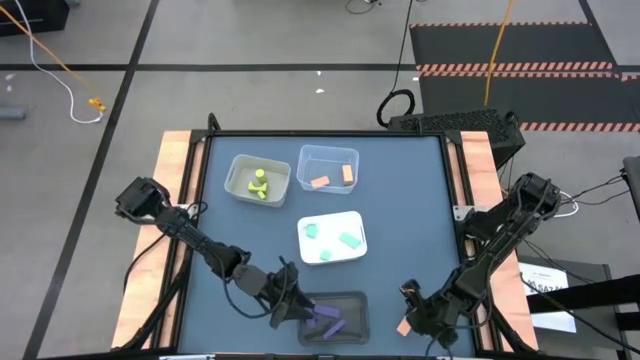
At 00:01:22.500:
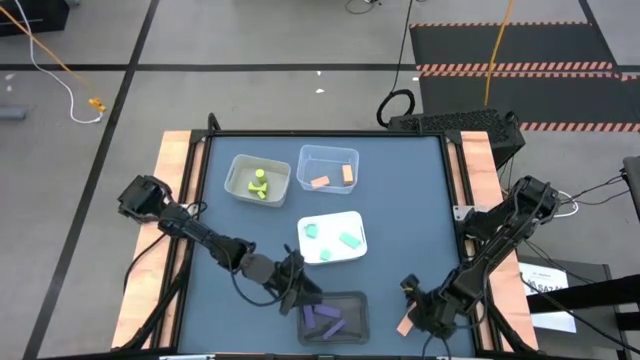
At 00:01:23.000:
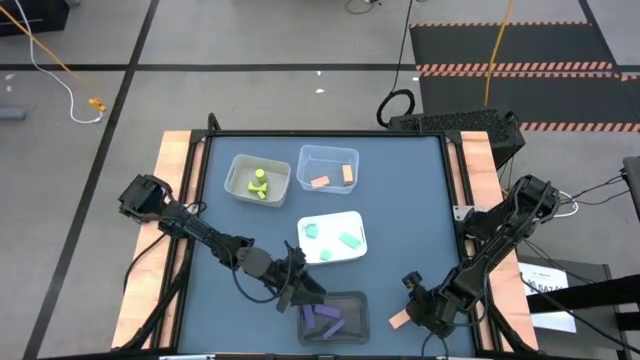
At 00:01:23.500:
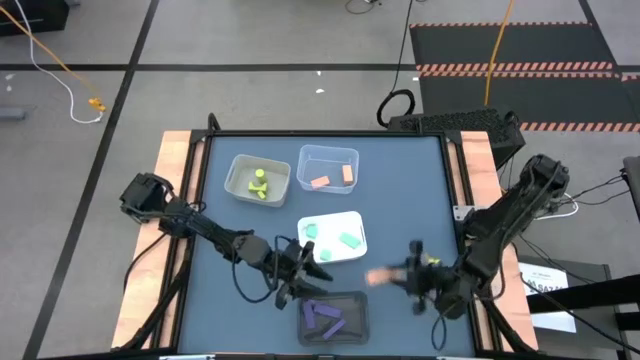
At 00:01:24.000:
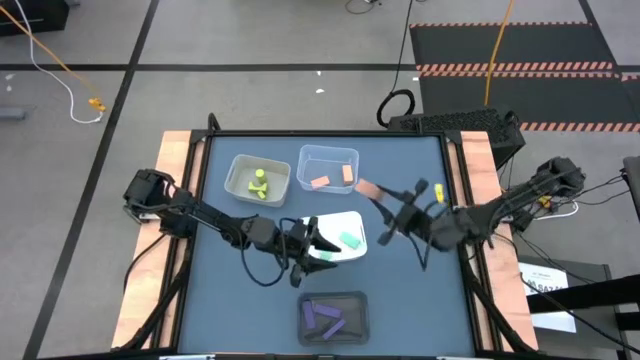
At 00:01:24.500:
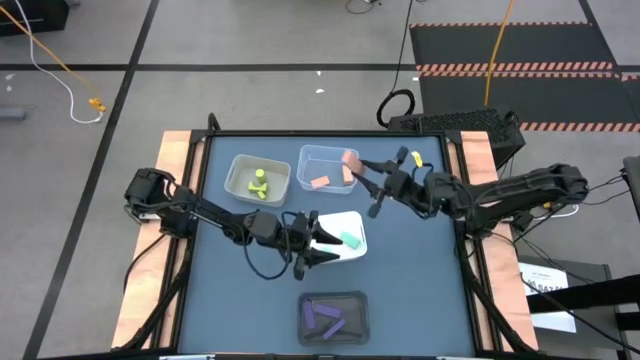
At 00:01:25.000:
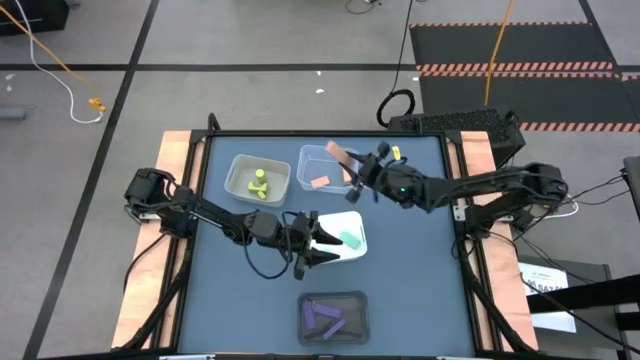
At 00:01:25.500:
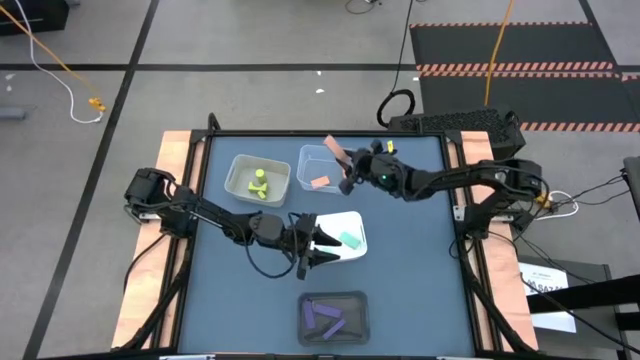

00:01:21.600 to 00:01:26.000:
Task: Sort & place blocks by color
Put the brown block into the transparent bin

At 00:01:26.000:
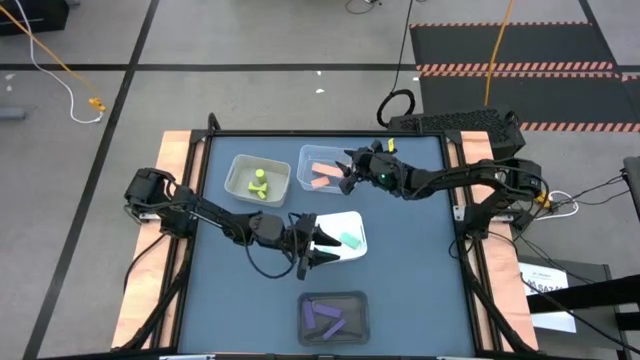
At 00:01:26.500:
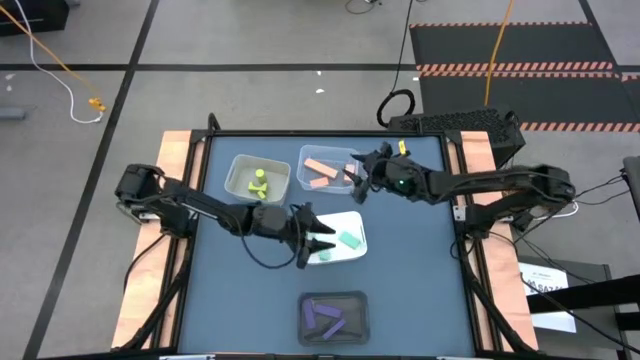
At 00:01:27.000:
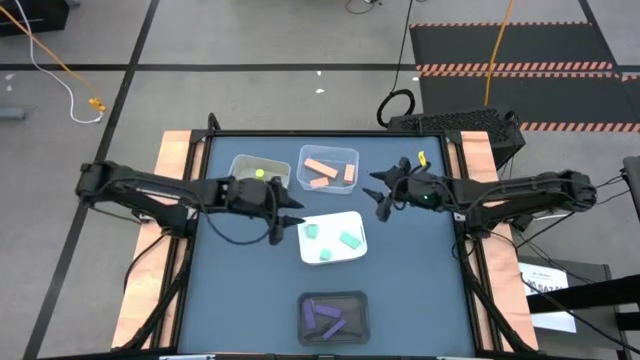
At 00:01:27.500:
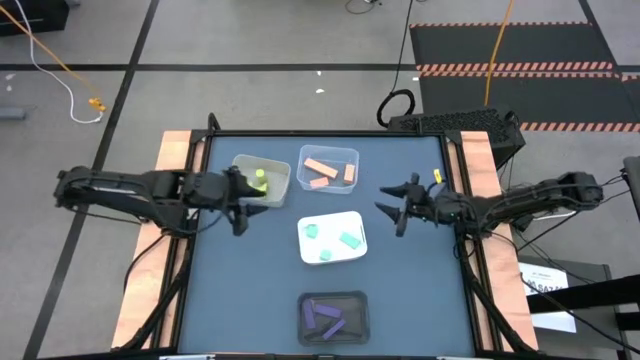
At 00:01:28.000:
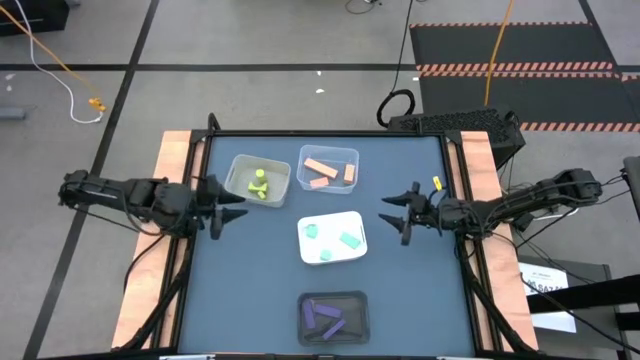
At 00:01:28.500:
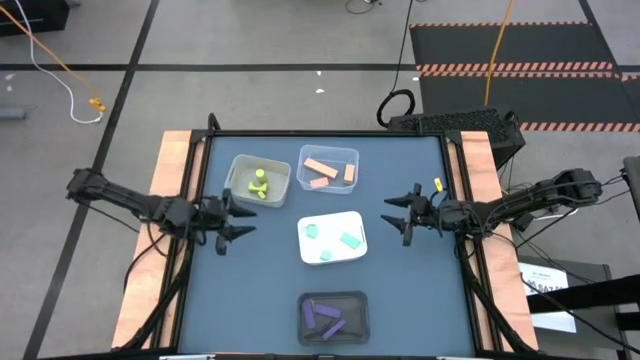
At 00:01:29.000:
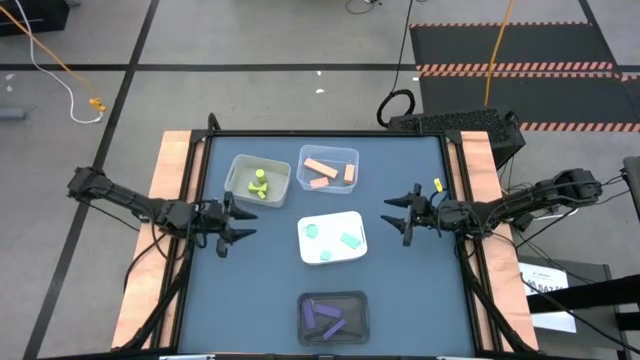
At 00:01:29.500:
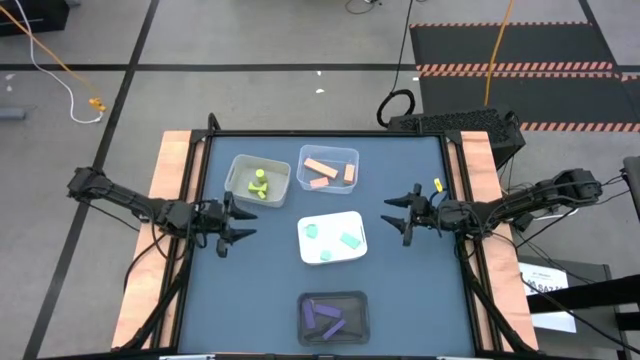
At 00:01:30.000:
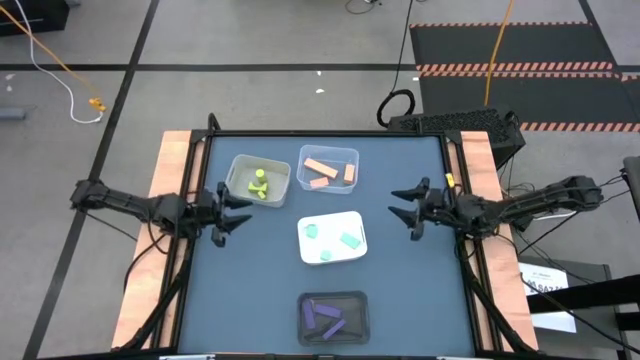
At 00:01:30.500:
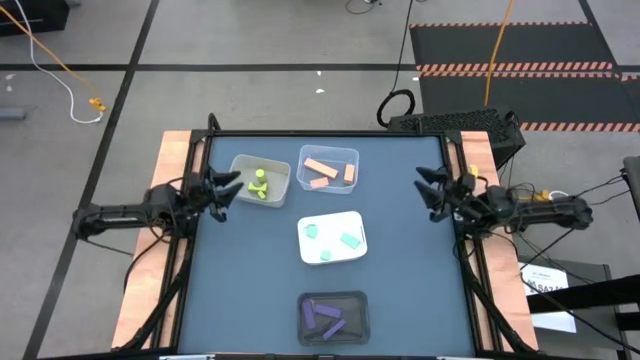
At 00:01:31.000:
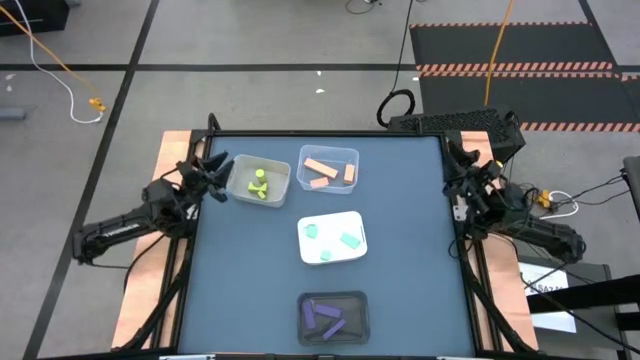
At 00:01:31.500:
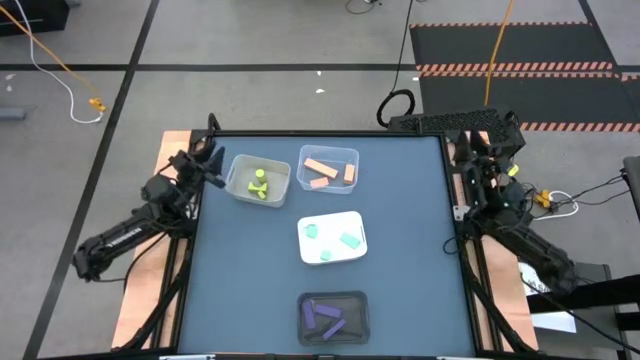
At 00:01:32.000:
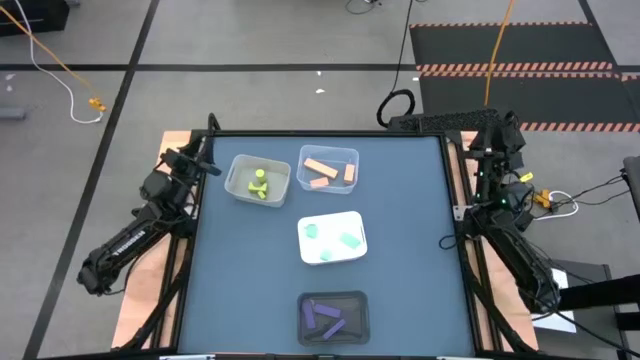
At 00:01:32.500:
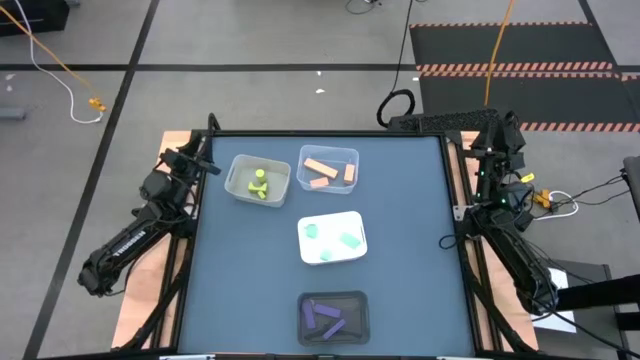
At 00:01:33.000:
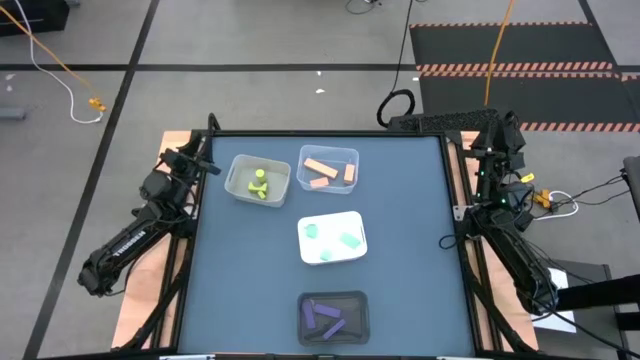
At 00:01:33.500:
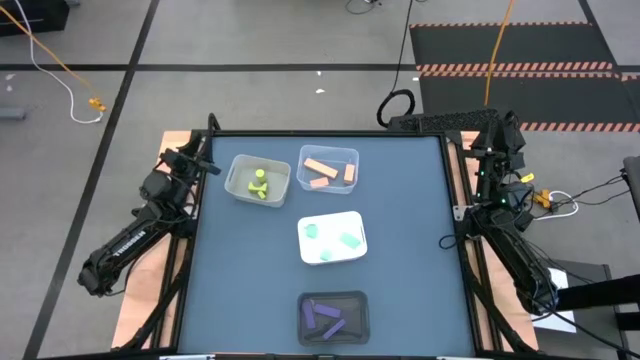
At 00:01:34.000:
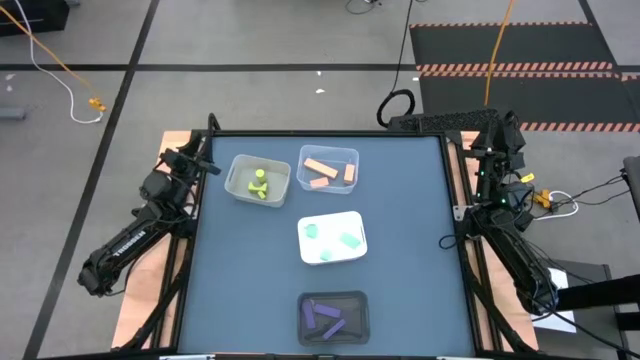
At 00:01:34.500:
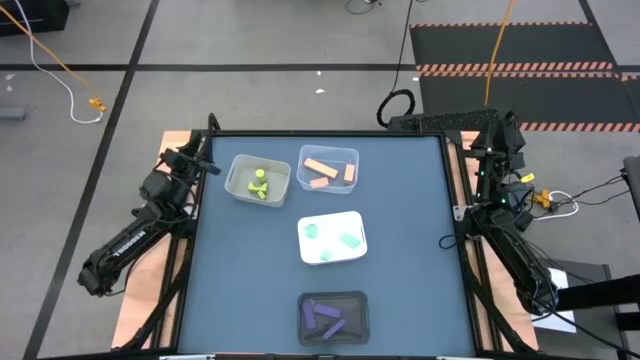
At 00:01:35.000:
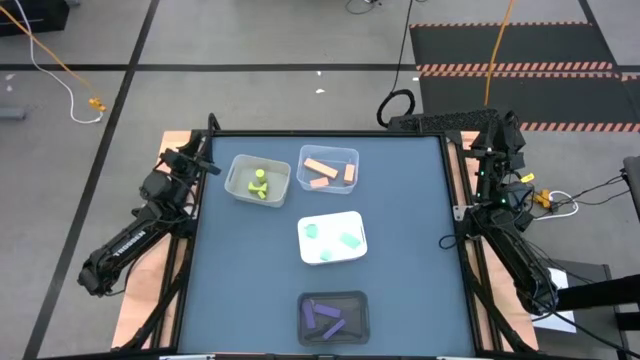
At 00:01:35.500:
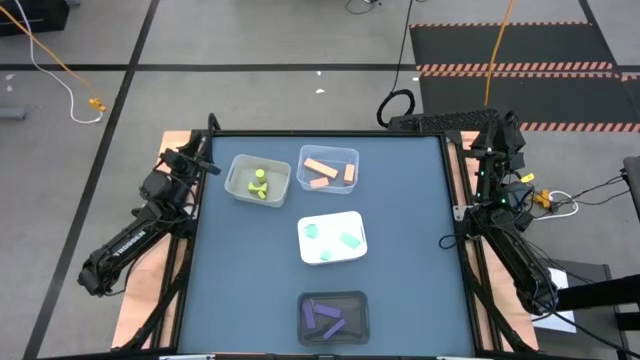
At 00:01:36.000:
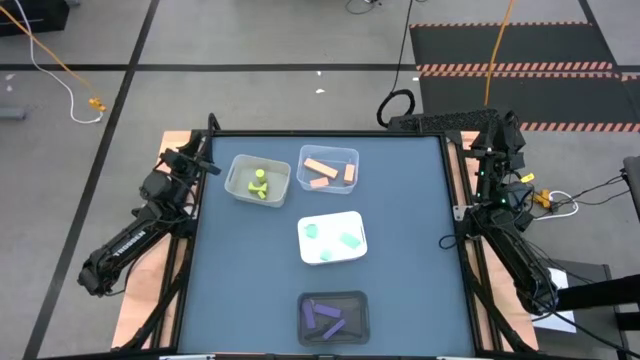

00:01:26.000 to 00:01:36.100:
Return to Home Position

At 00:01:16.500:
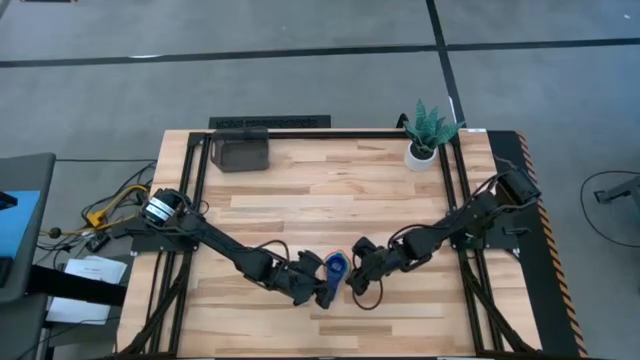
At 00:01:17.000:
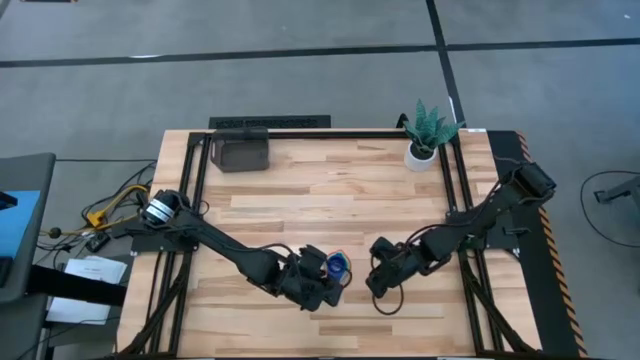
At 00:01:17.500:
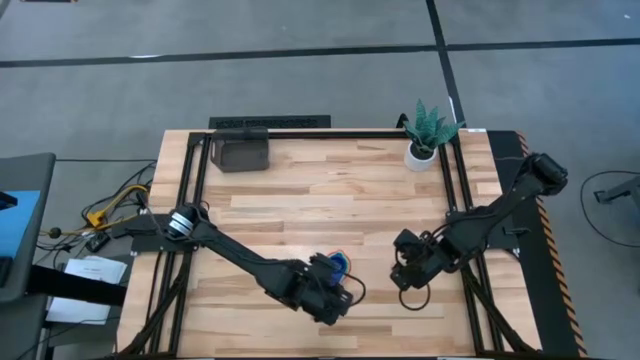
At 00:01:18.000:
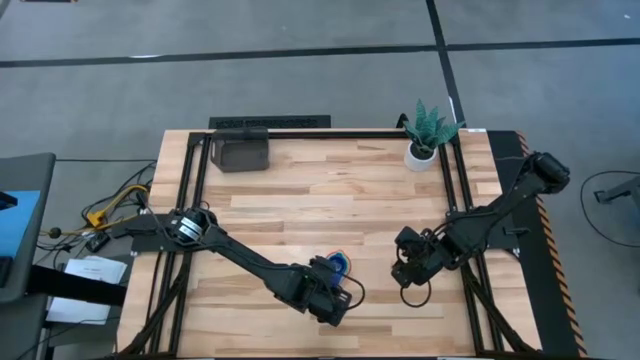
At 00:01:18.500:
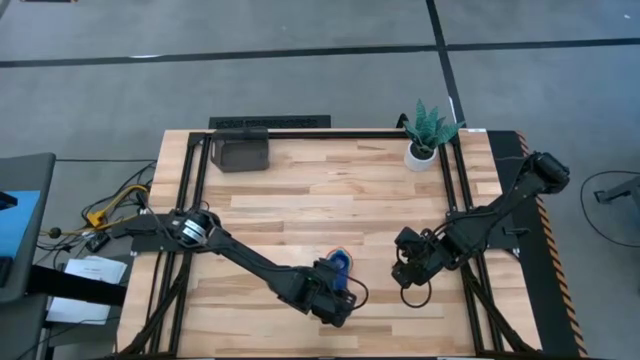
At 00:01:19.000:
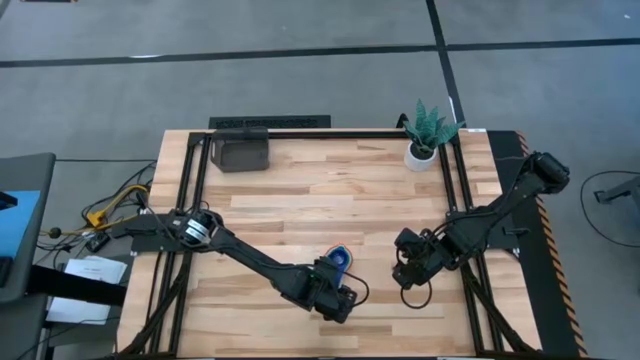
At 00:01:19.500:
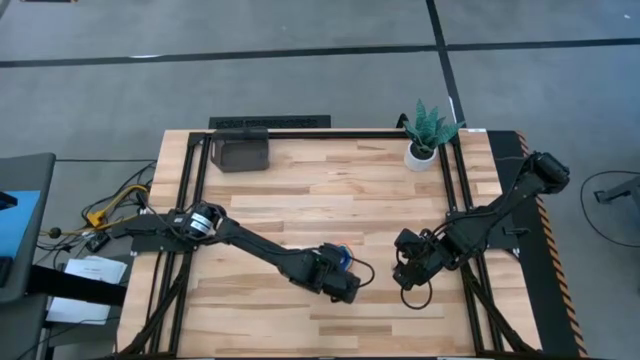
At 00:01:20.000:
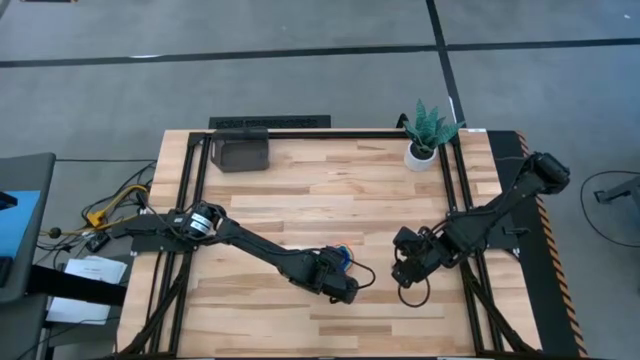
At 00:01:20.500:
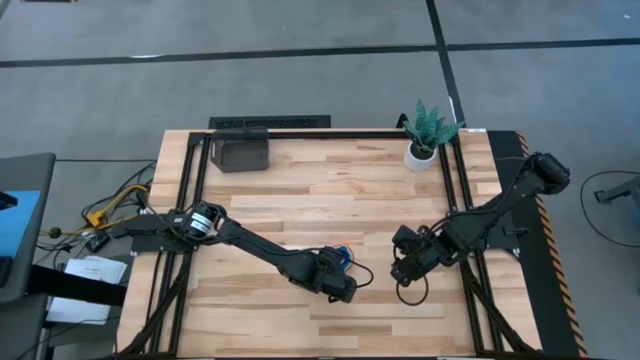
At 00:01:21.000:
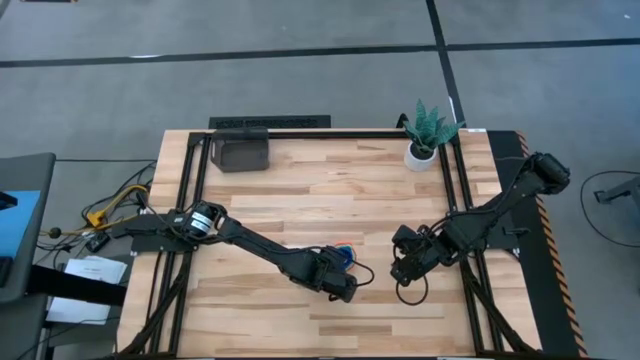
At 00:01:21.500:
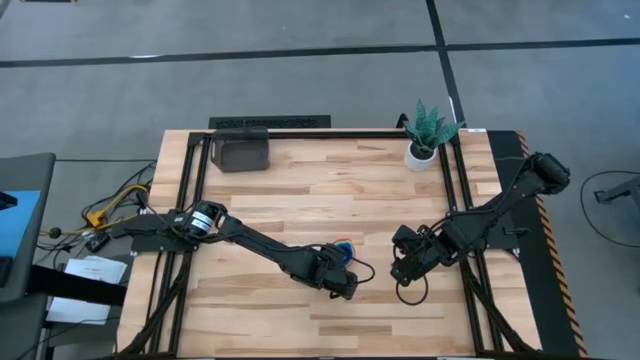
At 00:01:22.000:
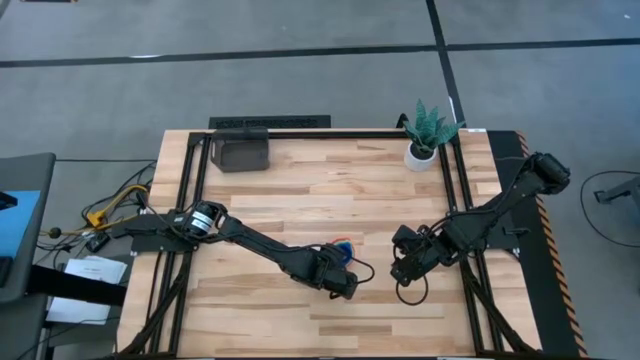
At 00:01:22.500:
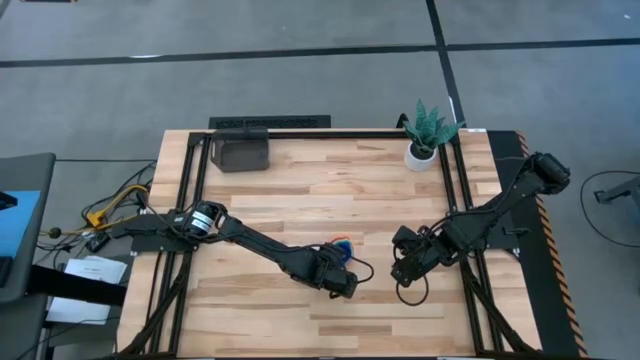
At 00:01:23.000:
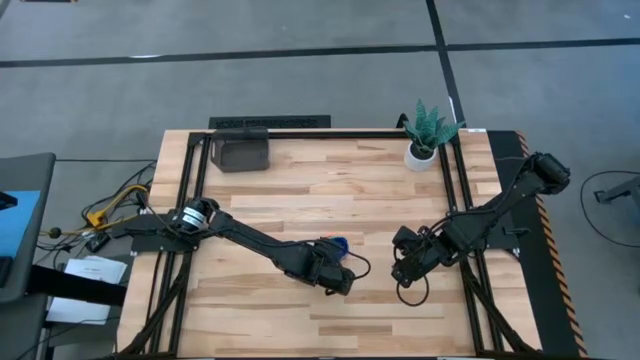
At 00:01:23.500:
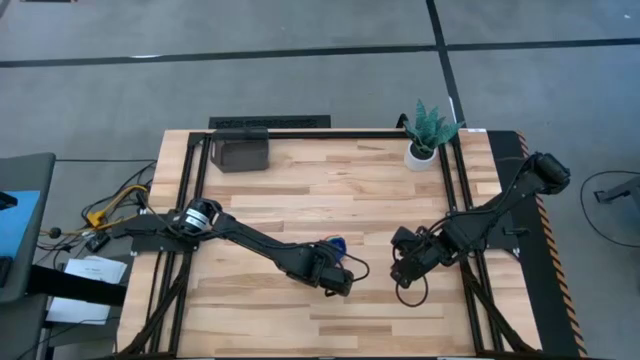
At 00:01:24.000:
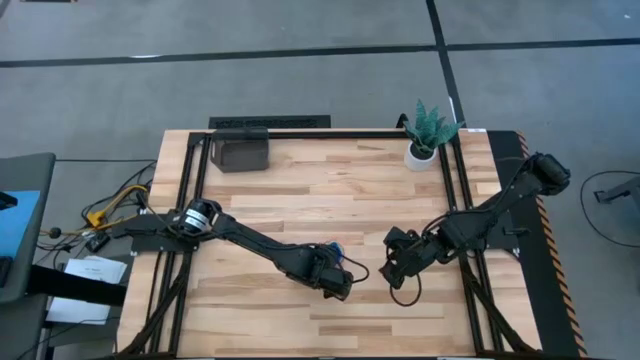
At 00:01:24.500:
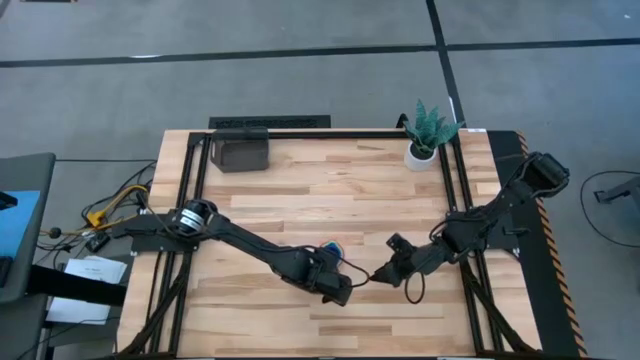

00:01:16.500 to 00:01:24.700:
Task: Nest measuring cups in basket
Put the stacked measuring cups into the black bin
